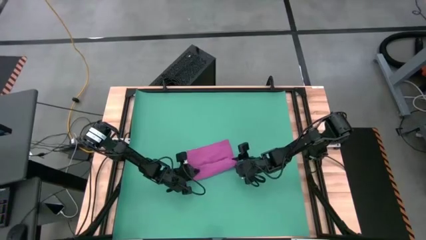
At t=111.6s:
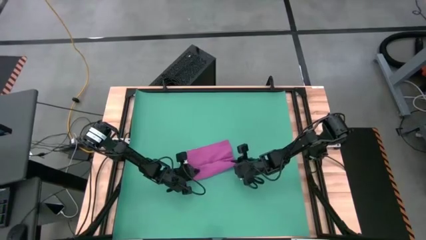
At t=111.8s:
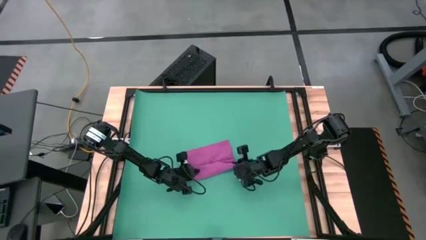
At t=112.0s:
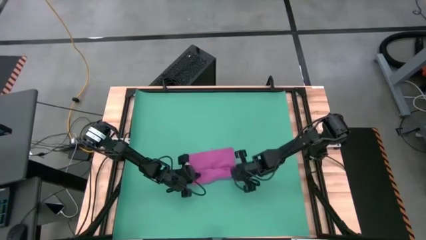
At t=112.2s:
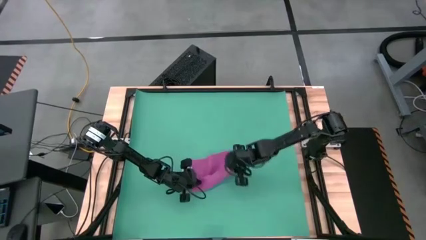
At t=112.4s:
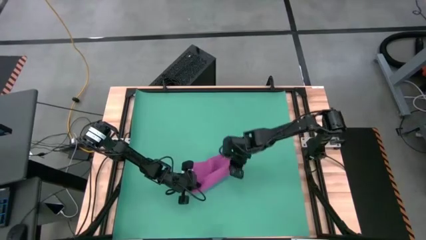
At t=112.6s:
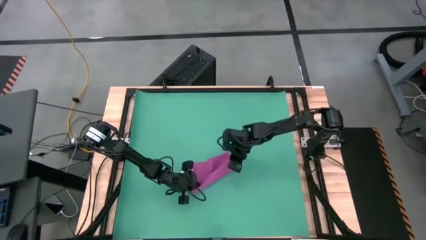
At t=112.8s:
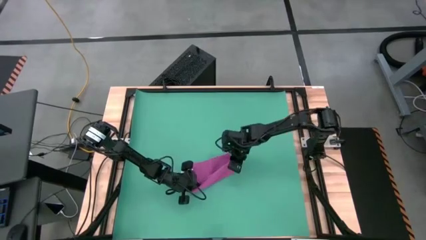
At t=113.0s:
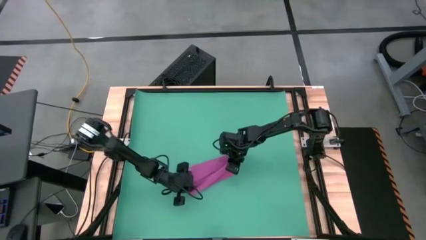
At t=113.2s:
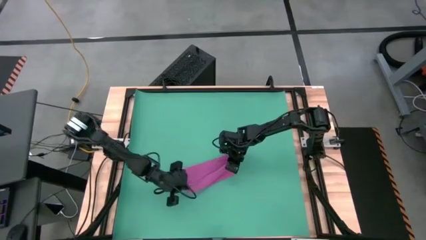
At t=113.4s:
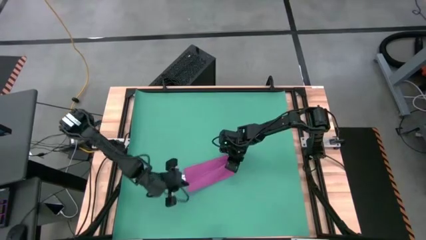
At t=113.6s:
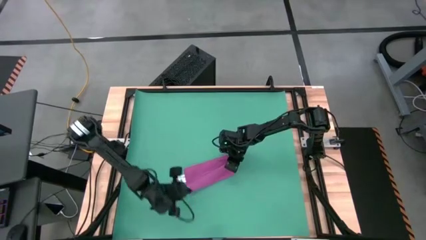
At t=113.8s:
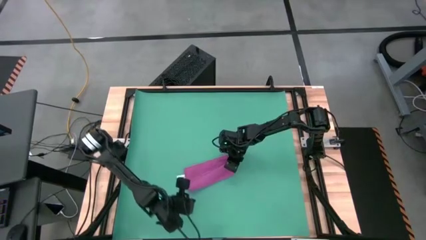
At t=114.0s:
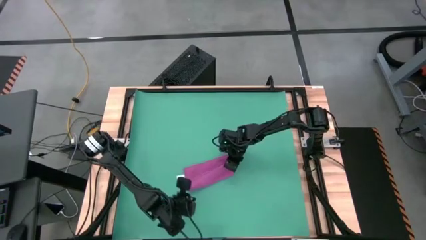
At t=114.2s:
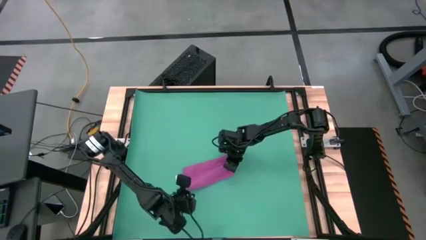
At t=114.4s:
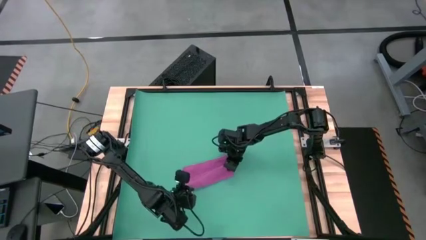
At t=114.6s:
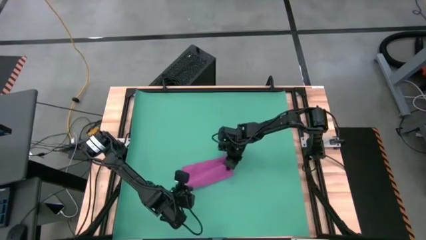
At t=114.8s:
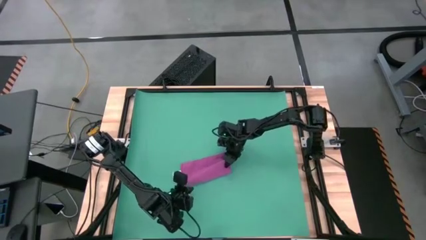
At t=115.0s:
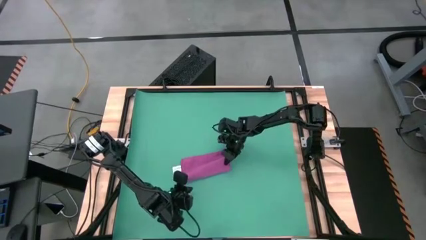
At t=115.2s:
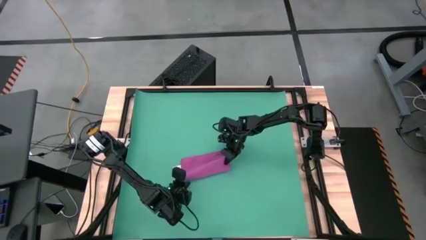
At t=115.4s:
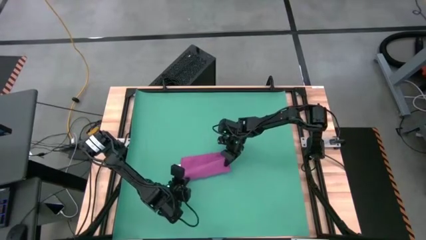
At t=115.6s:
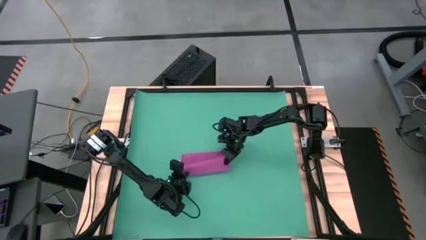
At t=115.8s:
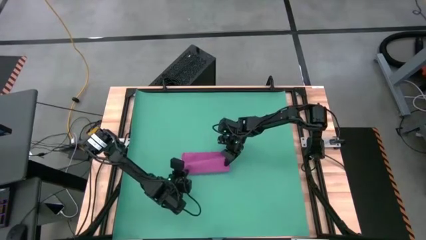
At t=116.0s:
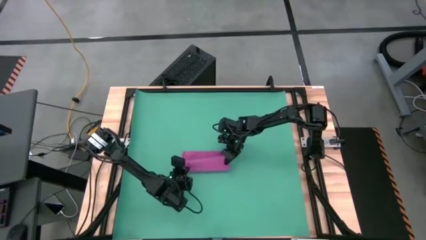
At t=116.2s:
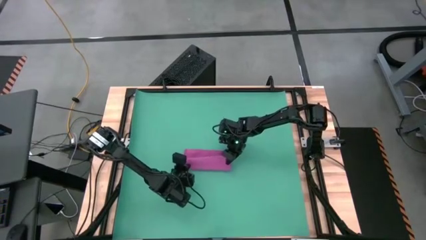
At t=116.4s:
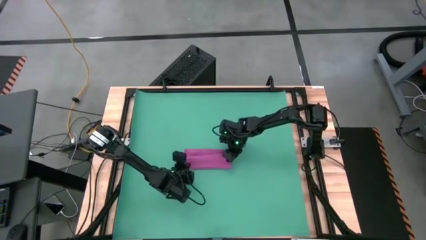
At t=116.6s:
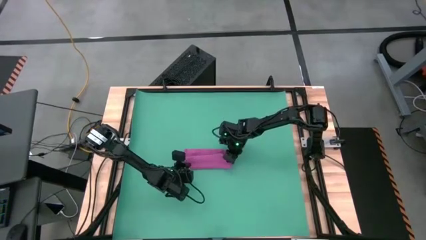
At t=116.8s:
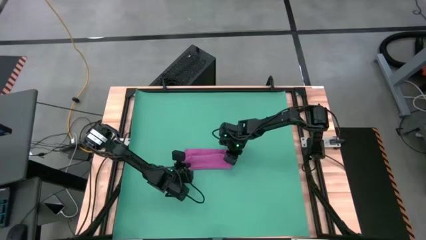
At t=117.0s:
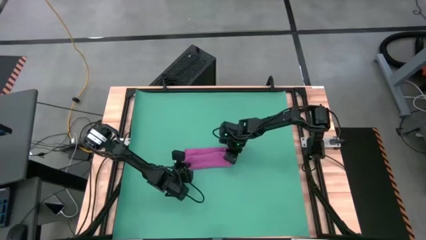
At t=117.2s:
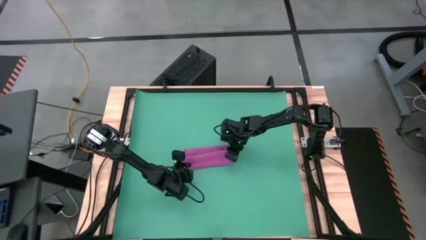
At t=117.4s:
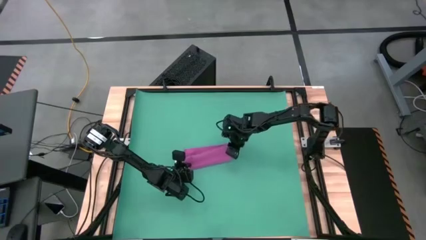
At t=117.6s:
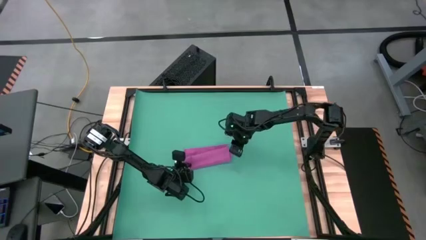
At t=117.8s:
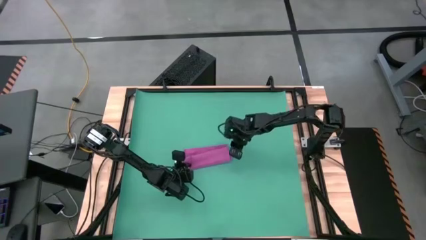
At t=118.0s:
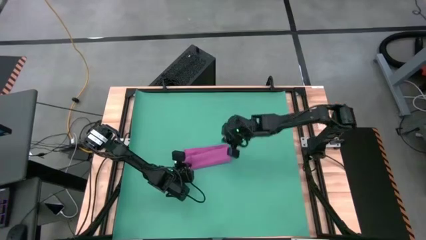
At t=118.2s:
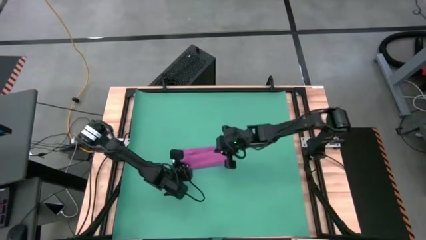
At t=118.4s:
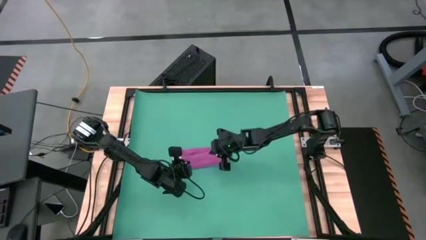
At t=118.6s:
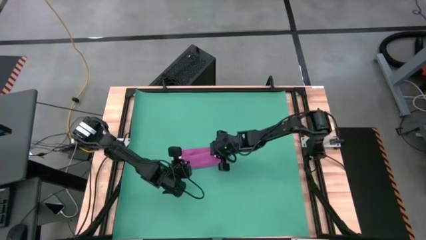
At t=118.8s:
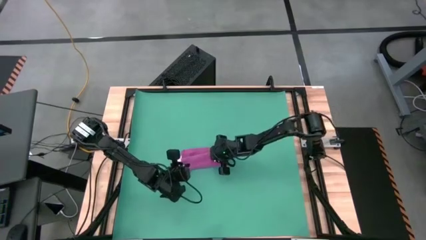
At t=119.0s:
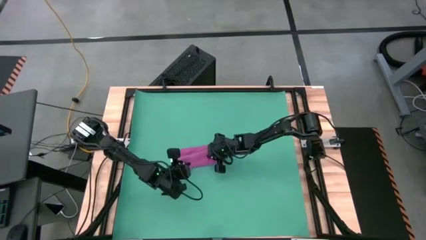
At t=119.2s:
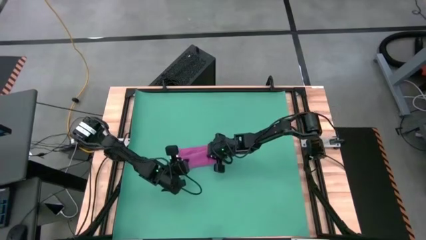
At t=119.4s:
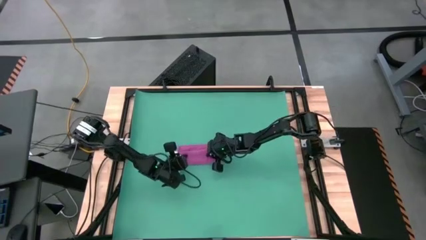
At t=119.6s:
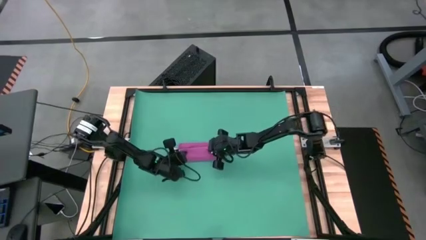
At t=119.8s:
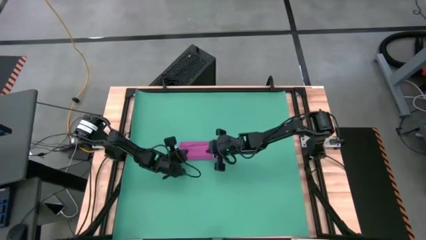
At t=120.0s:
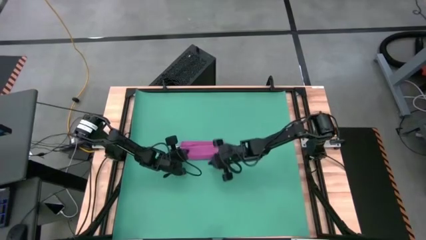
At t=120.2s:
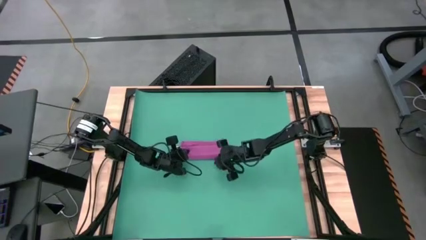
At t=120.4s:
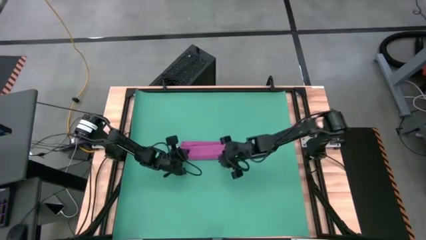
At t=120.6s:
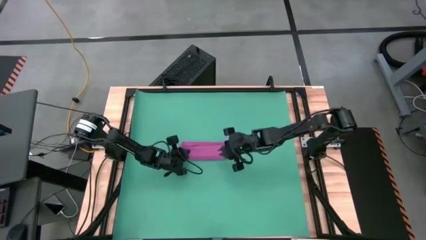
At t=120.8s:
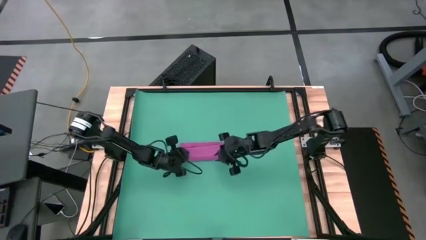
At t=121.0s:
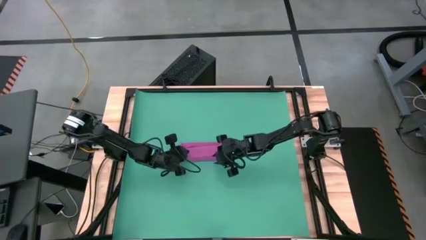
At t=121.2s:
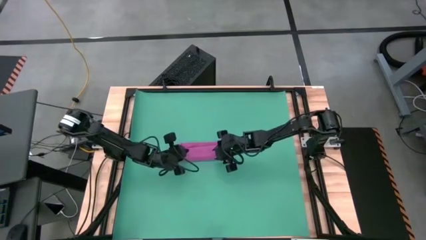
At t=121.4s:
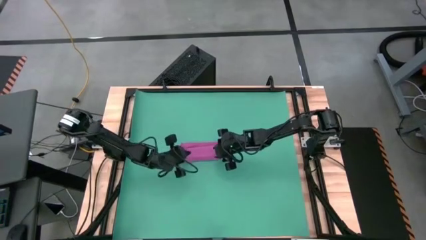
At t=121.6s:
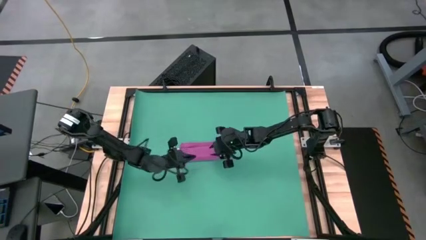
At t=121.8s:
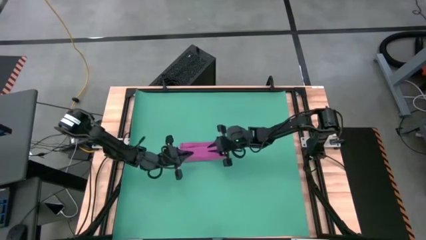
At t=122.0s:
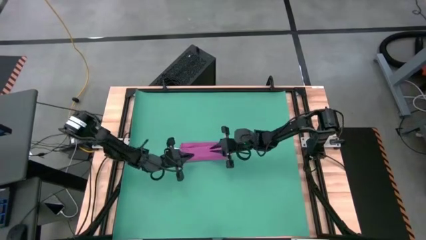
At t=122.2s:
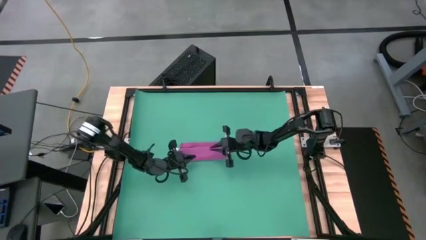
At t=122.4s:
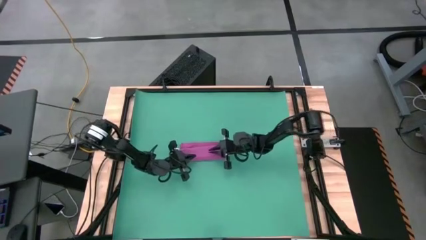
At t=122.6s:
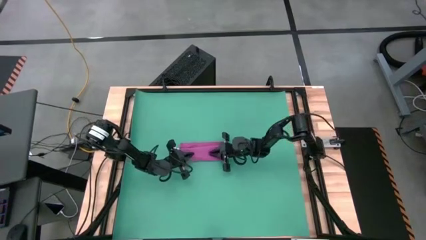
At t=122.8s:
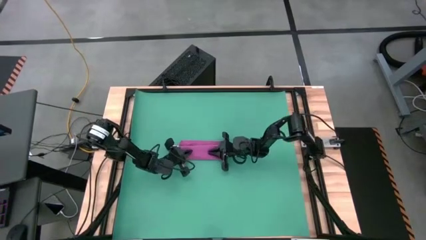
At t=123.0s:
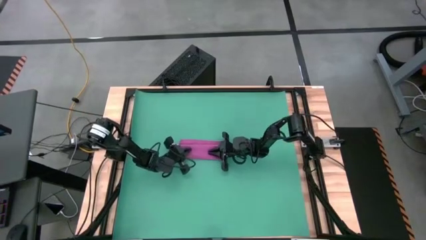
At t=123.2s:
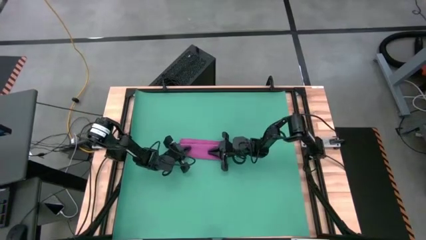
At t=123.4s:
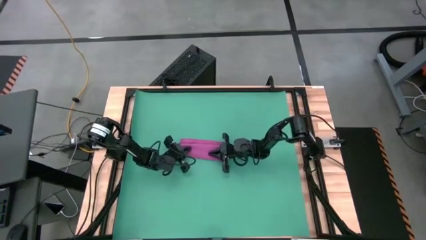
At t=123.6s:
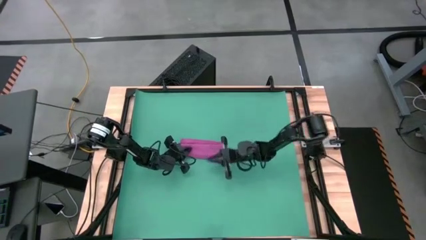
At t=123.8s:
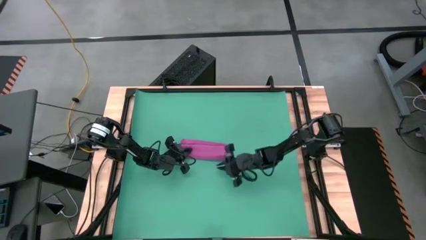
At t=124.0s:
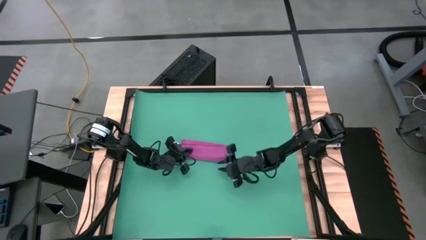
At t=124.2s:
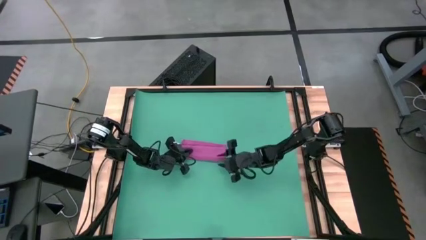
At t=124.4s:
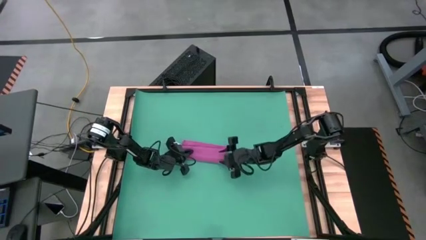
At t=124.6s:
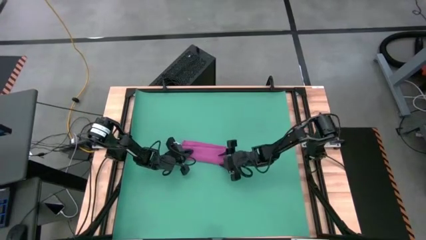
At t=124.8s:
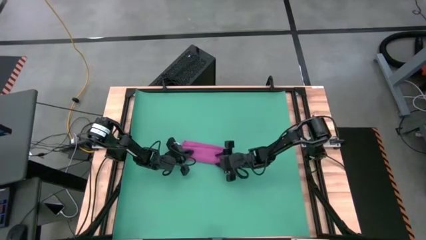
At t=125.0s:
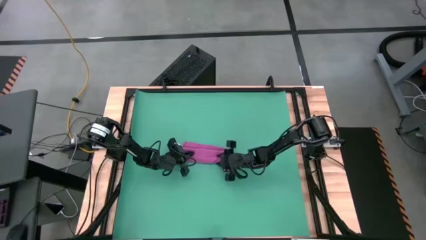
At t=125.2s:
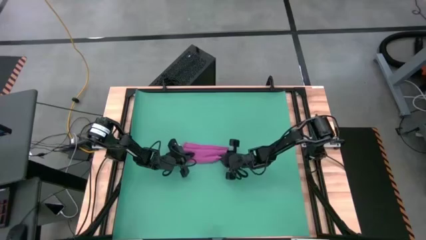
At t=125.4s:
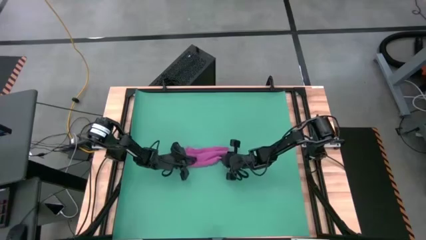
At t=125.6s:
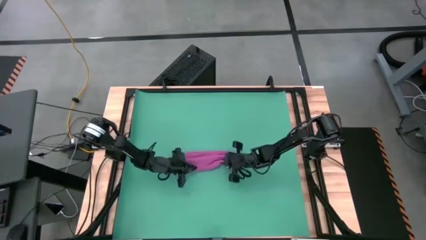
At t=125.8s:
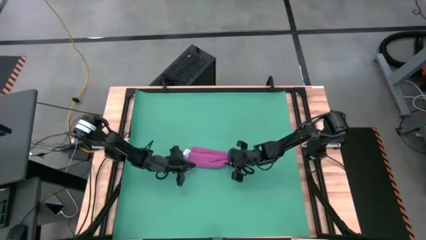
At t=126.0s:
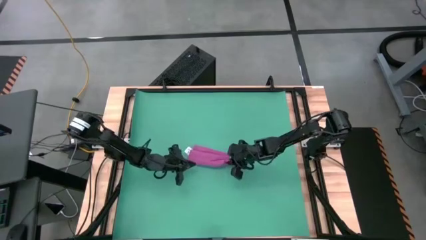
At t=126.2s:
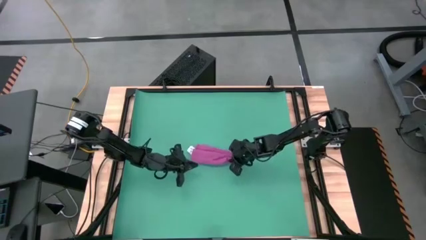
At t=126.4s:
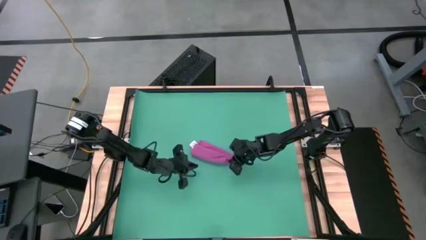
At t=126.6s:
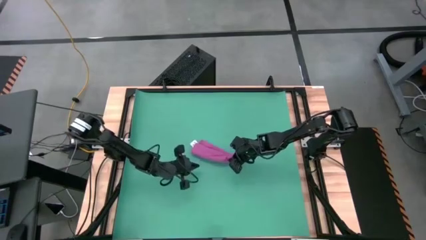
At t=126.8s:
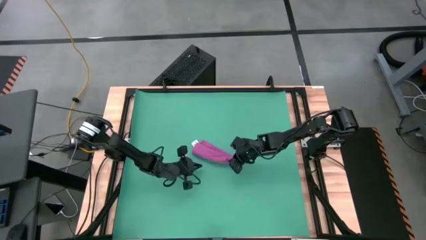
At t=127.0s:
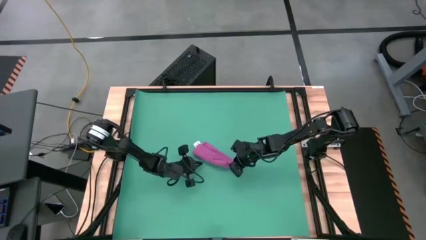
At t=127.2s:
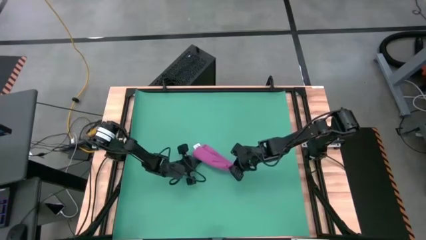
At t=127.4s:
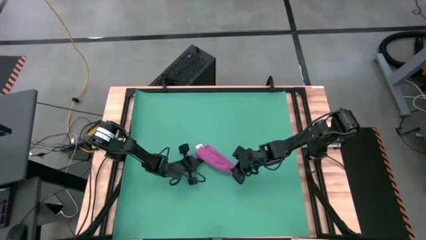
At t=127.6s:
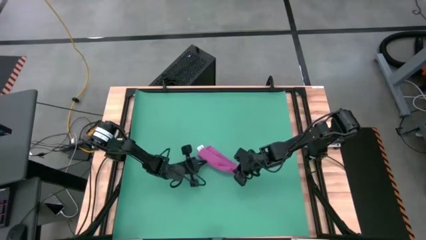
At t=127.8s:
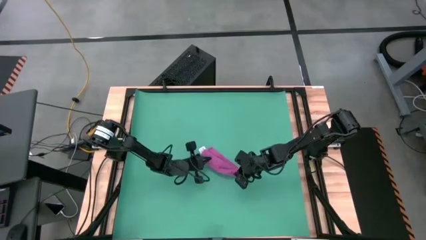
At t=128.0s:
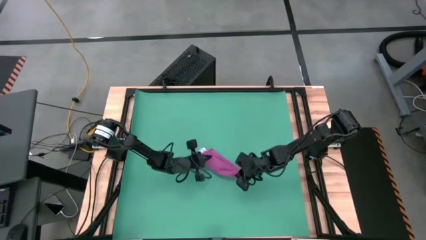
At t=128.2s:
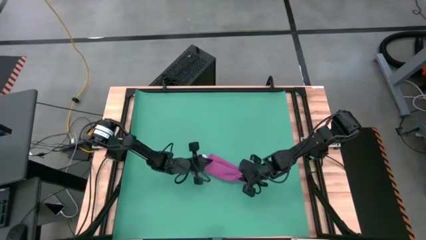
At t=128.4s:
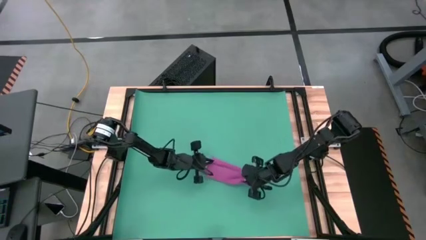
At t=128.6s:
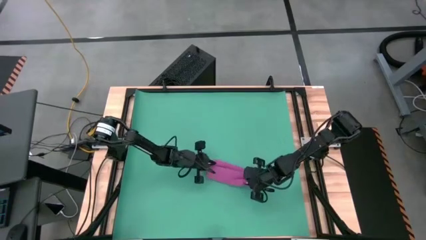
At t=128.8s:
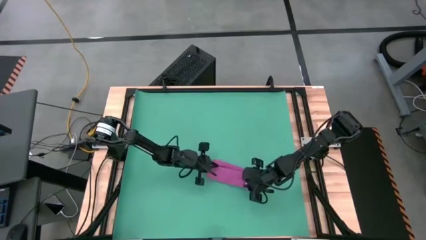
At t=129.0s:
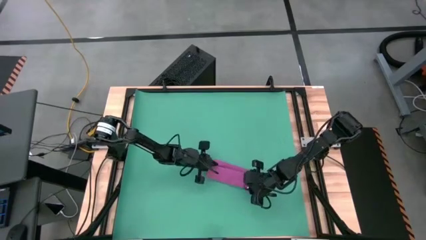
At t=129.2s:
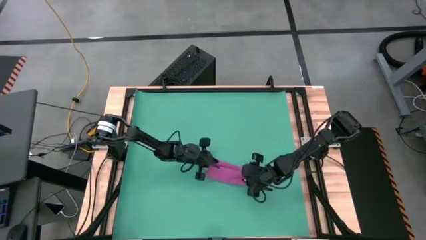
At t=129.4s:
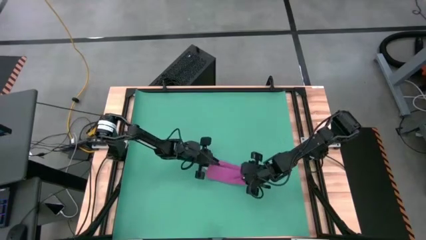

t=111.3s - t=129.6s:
Task: Roll towel
Roll the pink towel
